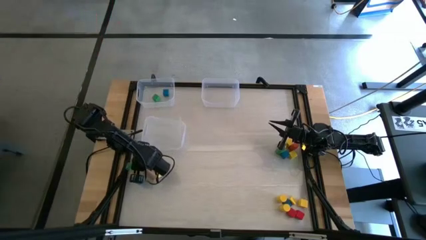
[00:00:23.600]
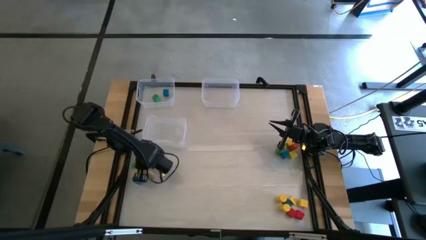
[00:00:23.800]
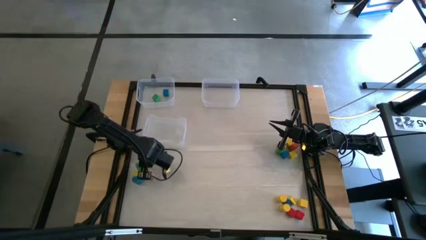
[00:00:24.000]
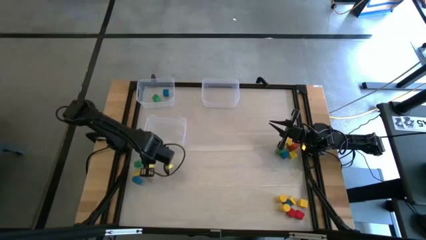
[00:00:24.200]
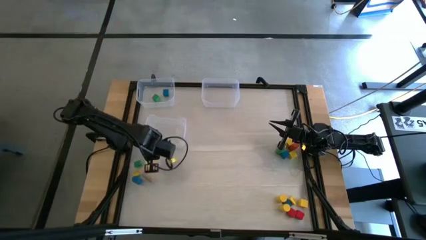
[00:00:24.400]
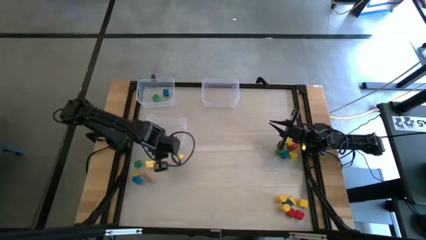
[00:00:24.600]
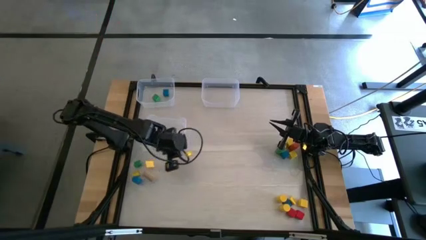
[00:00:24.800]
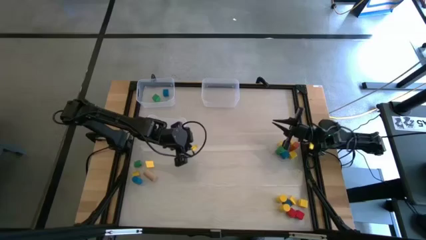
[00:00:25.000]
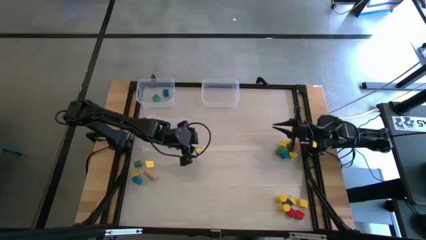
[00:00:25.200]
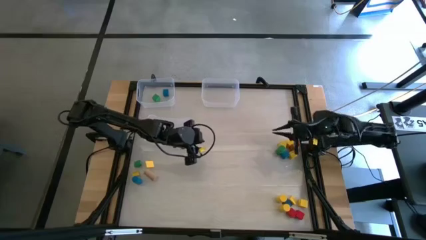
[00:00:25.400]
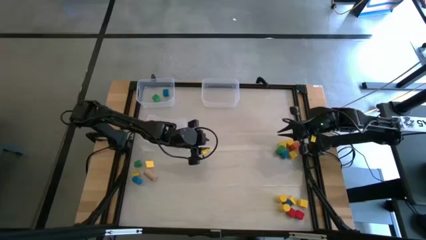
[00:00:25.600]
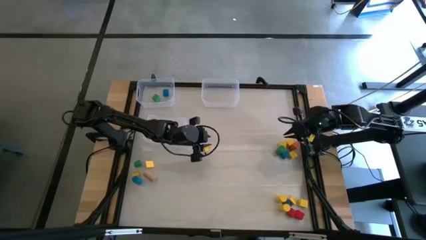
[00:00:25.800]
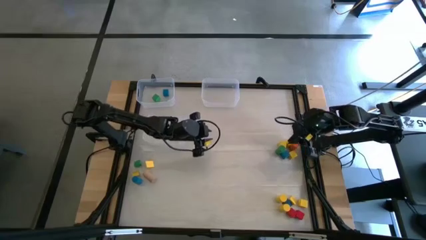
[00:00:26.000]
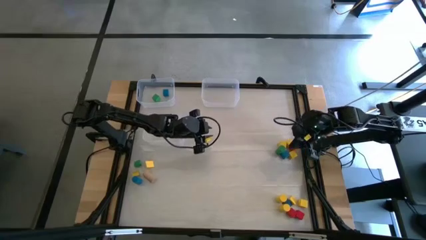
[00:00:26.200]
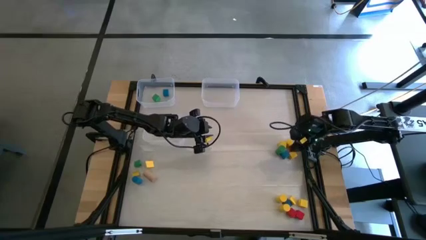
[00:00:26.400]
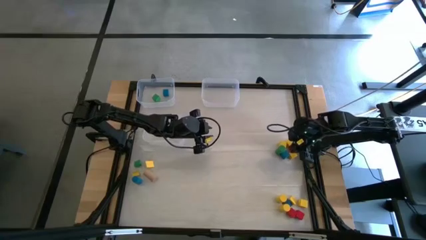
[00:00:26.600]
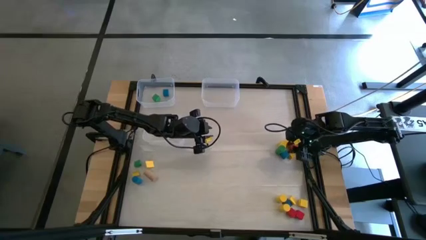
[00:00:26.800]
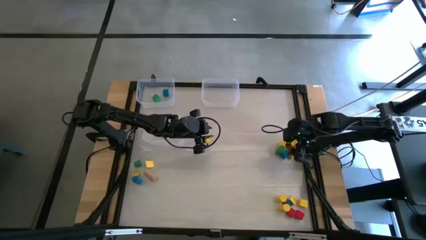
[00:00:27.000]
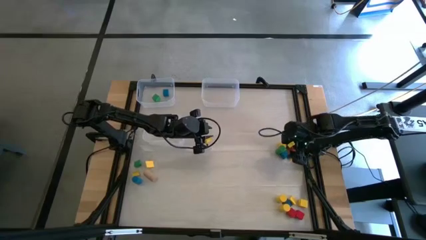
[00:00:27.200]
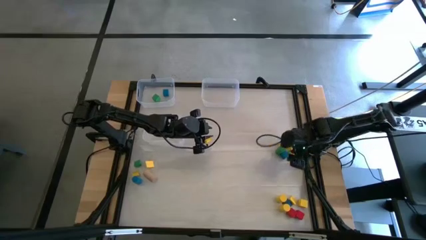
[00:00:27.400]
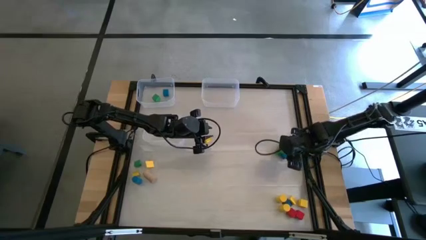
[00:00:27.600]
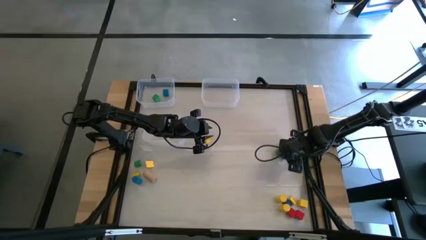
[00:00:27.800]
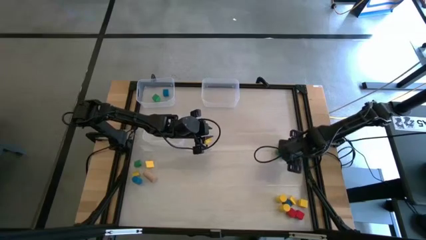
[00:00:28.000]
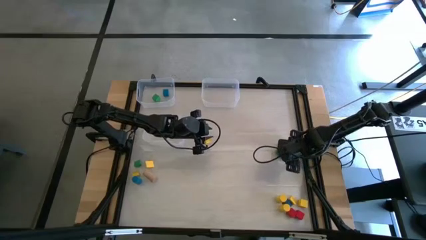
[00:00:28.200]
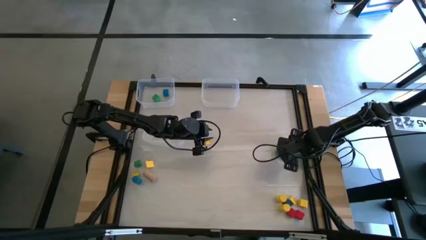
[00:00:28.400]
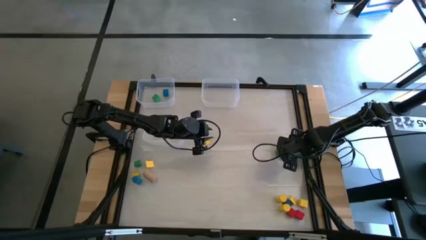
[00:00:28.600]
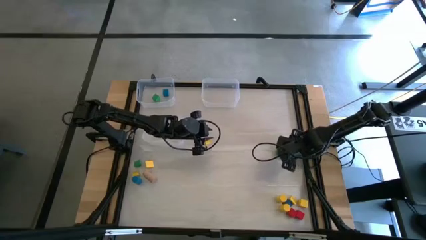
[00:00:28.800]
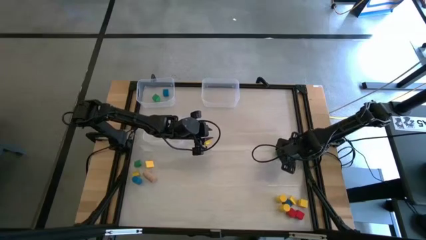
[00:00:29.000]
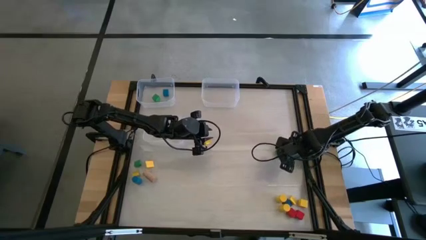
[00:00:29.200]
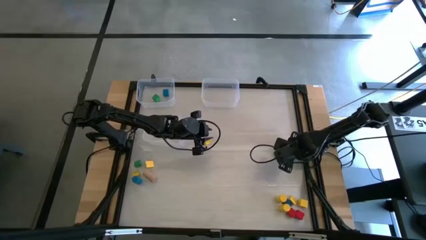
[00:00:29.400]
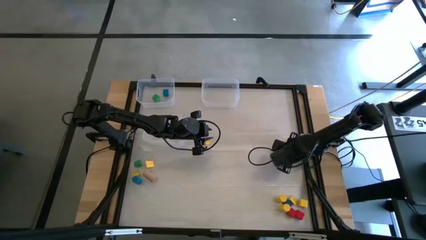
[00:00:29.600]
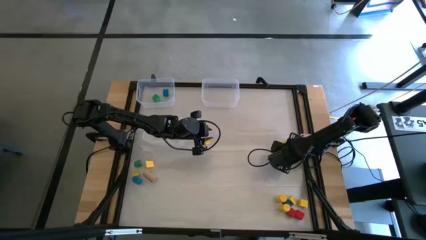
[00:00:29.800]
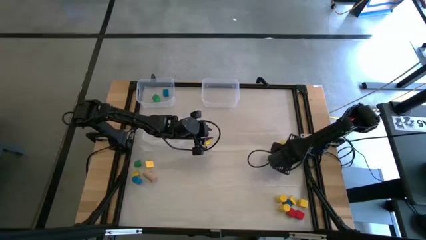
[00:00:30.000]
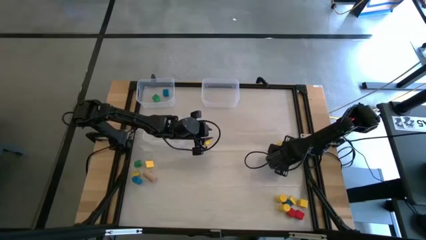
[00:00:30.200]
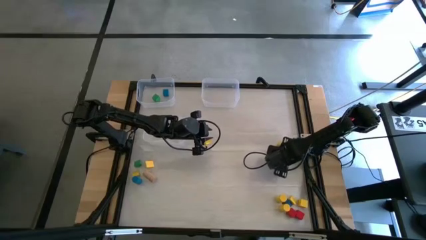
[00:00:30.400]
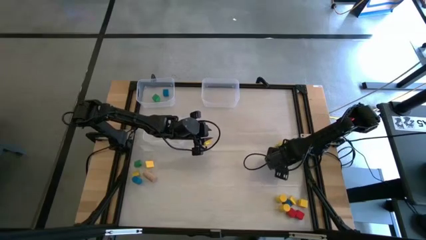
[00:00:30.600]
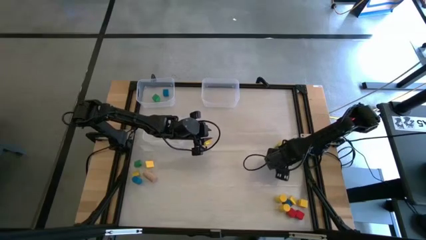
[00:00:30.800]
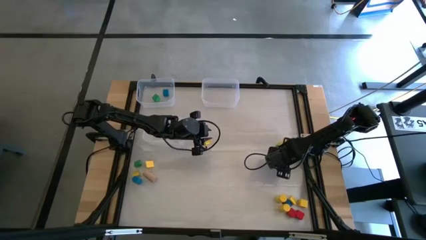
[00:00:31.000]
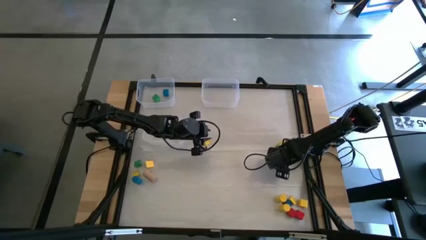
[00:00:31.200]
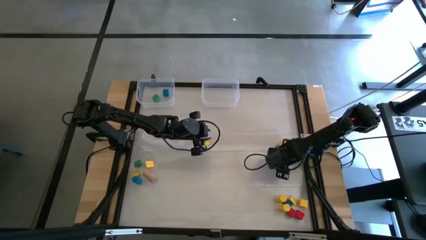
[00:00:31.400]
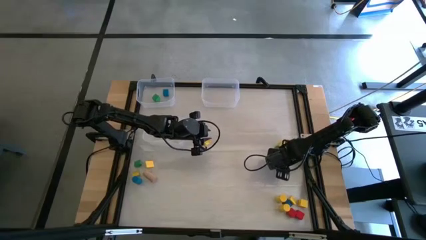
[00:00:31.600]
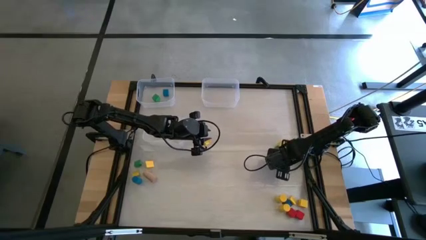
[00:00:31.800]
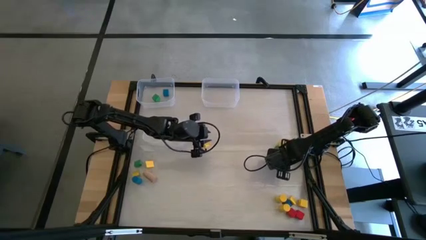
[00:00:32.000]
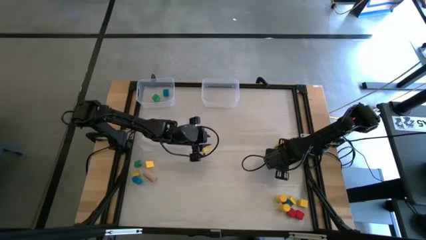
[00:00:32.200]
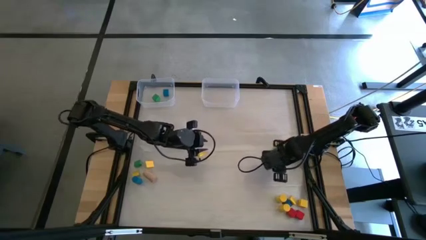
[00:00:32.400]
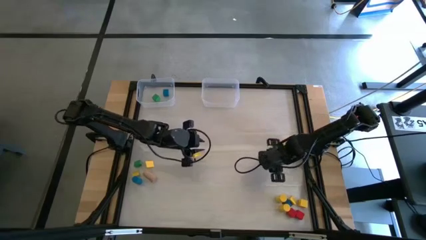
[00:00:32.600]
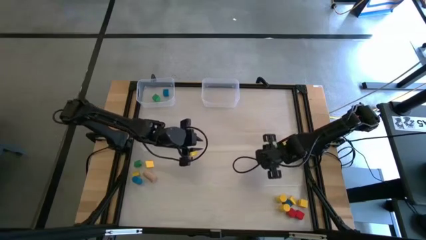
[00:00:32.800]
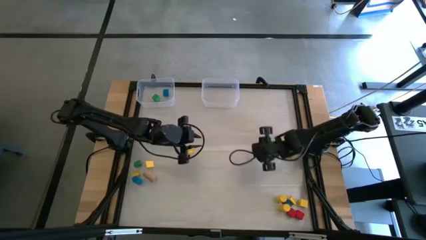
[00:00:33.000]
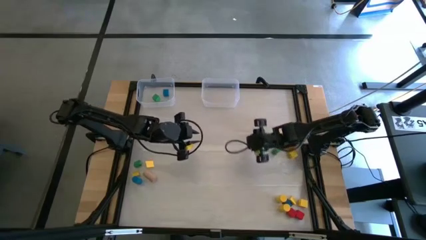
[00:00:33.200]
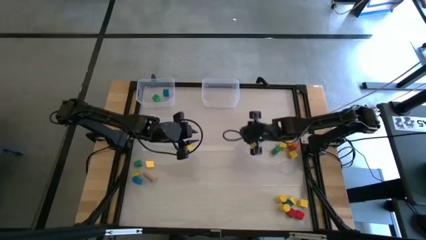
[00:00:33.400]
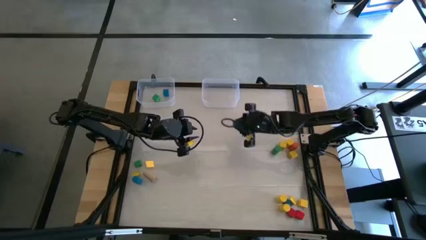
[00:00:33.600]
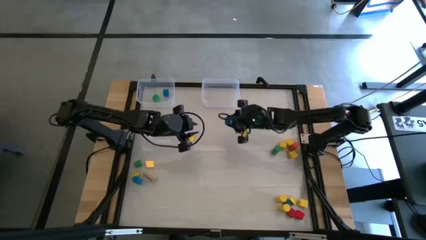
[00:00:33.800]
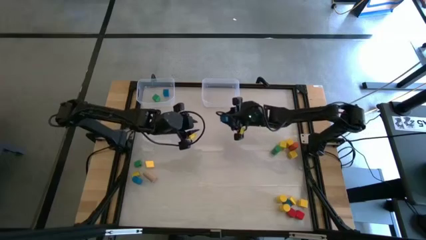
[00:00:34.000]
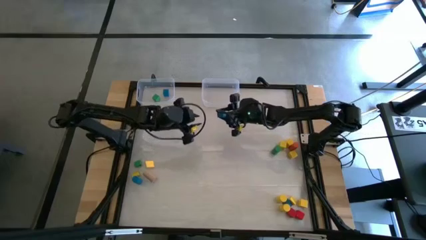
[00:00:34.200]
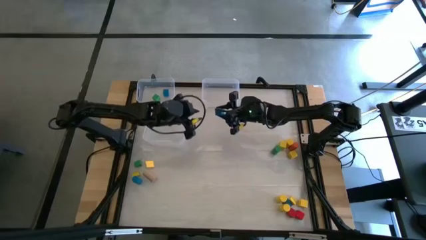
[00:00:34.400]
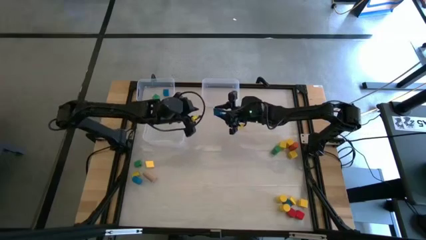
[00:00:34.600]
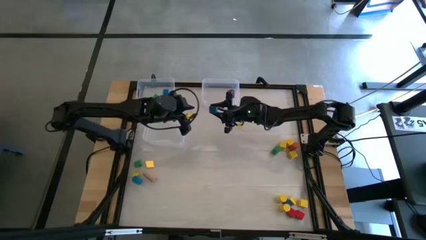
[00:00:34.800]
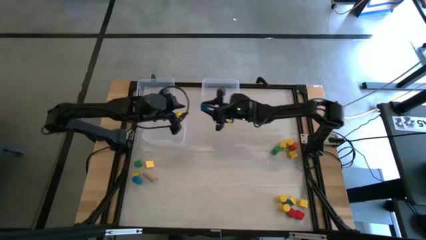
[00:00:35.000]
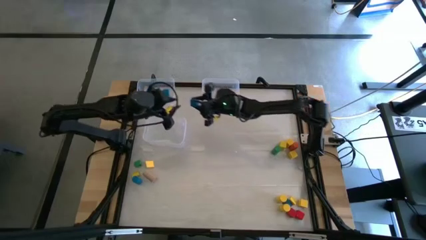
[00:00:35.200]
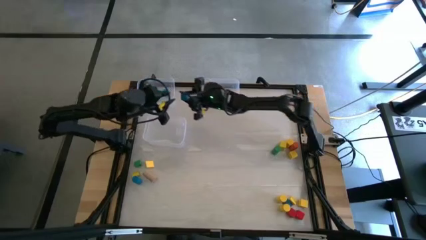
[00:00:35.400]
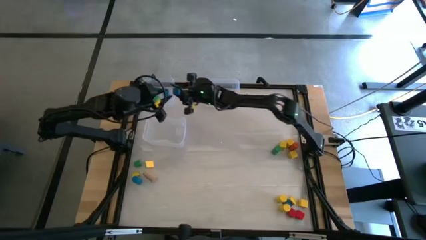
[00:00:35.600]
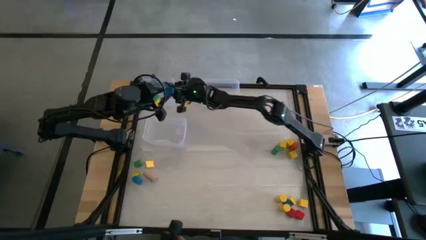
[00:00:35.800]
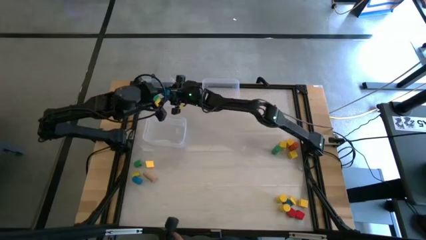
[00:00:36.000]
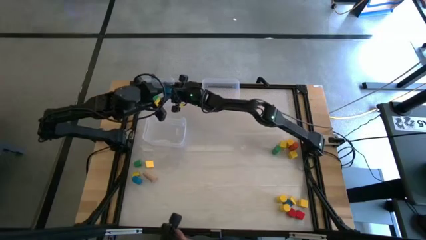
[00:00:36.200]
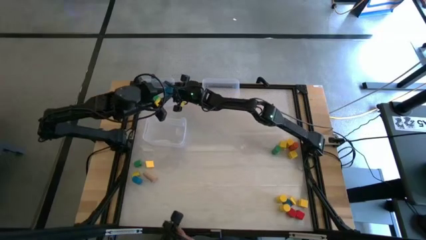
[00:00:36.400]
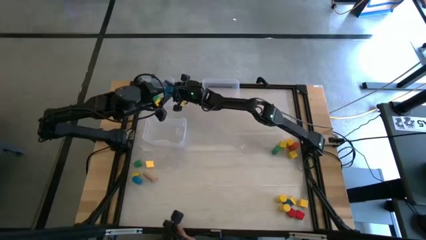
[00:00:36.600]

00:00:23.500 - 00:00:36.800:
Task: Sort blocks by size
Put the blue square game block into the top left transparent bin
